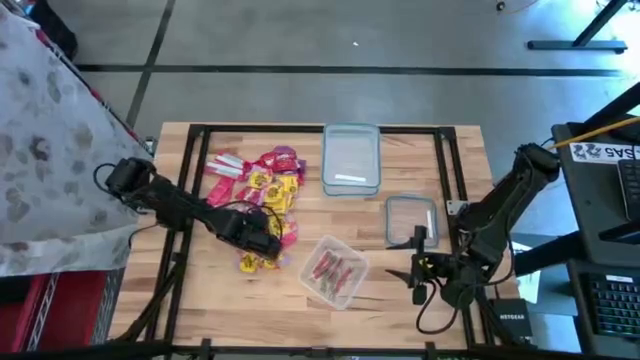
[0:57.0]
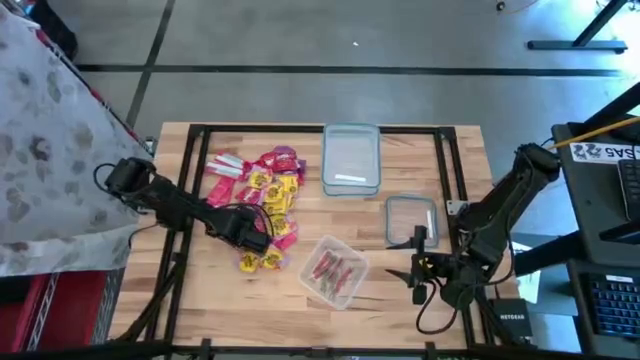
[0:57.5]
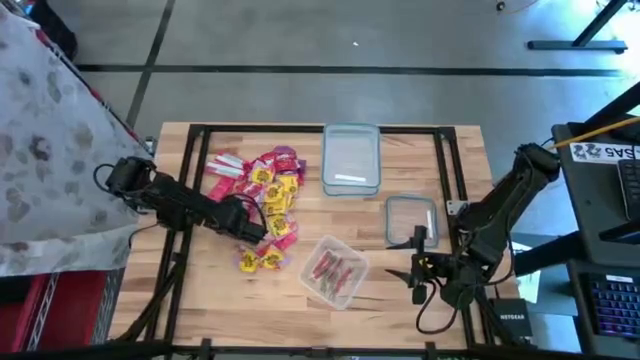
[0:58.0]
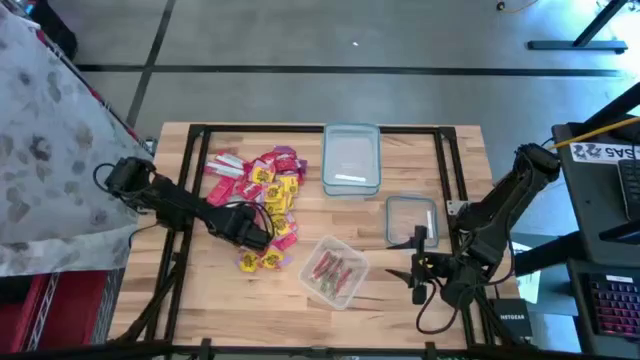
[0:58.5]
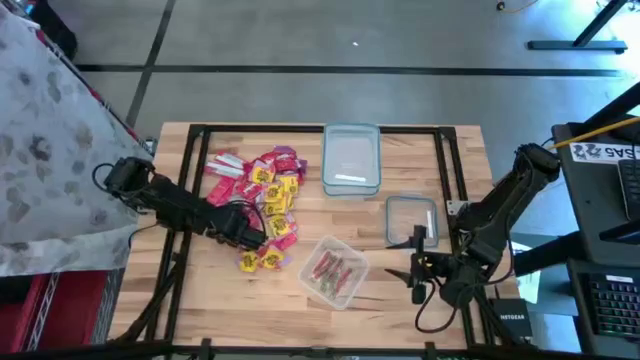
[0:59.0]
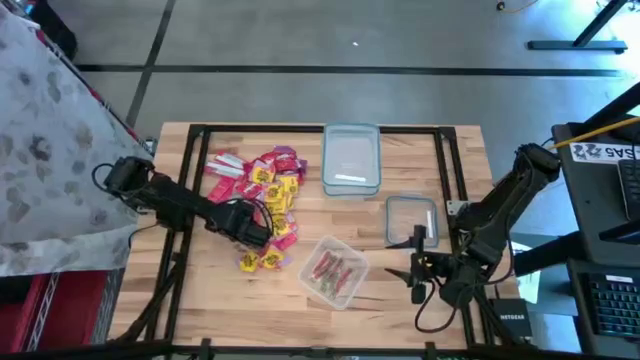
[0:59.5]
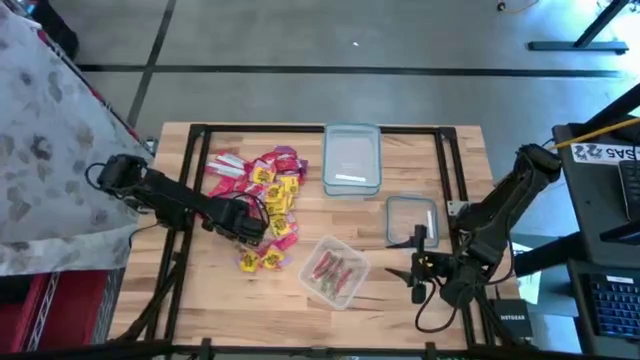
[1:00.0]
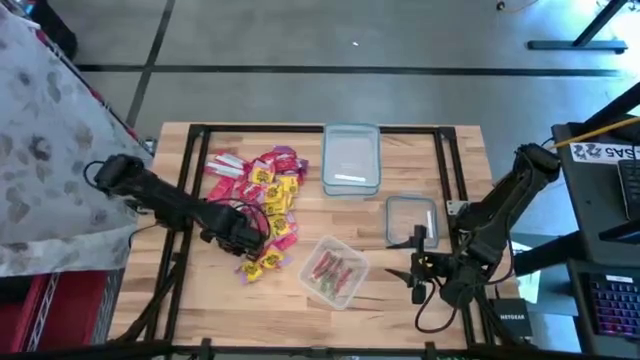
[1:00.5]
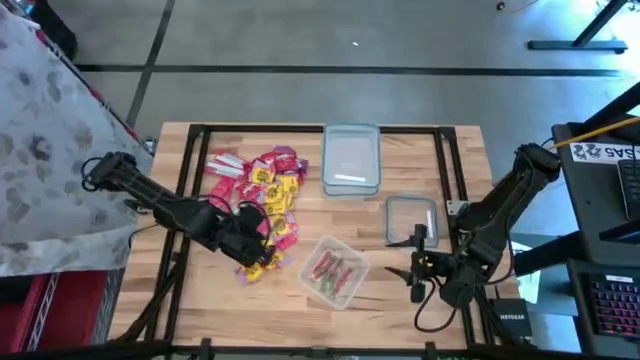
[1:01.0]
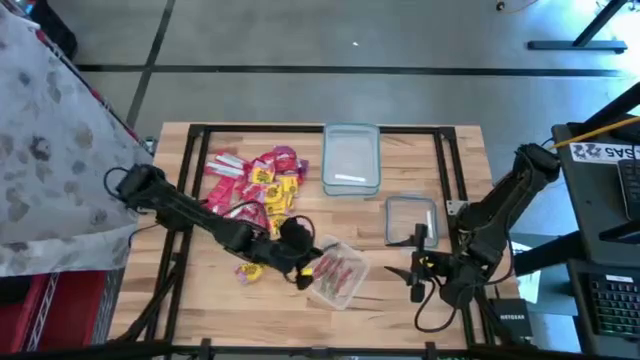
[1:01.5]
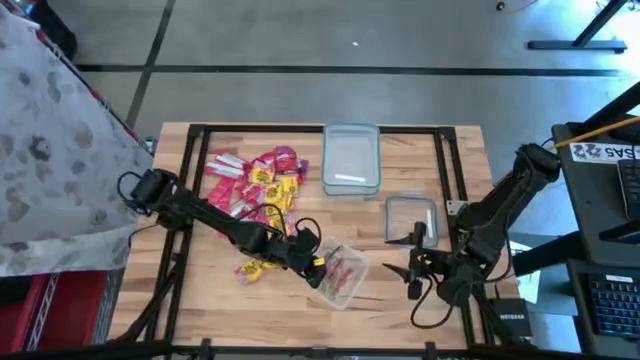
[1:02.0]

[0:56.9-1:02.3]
Task: Sort candy
Put the blue candy into the square transparent food container

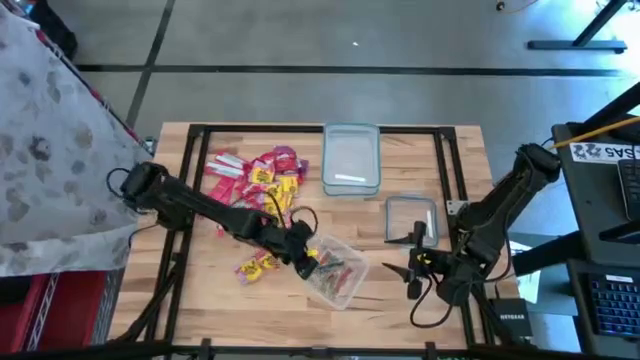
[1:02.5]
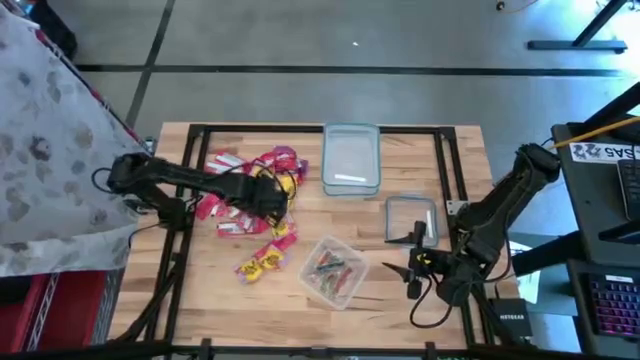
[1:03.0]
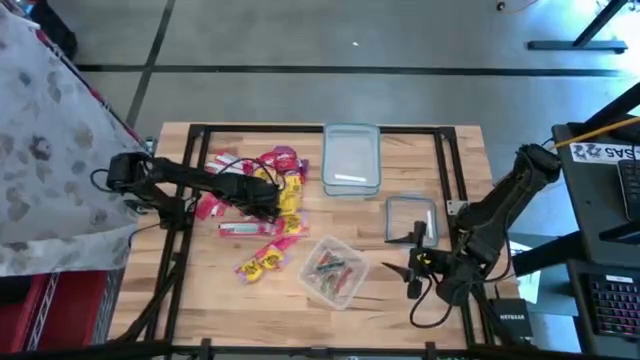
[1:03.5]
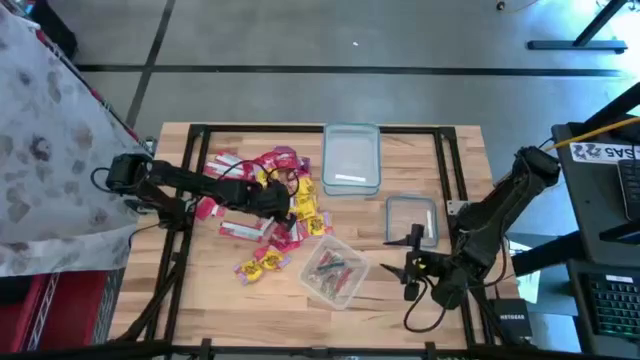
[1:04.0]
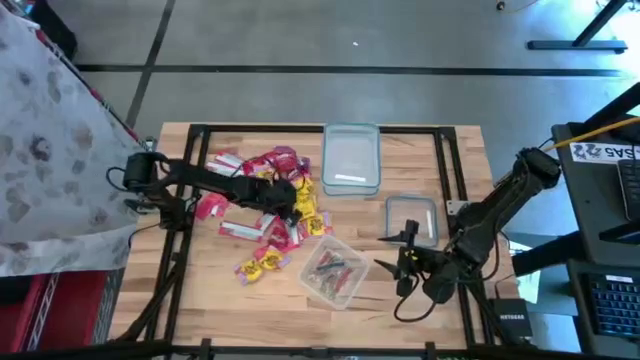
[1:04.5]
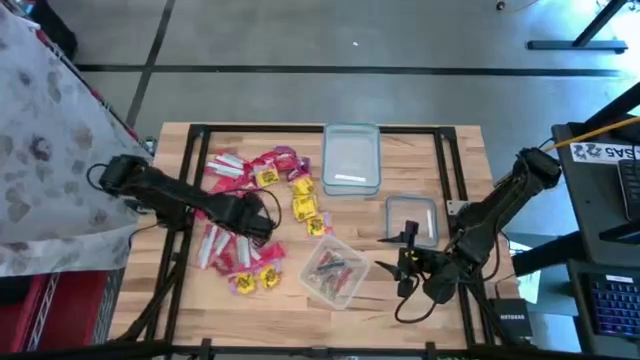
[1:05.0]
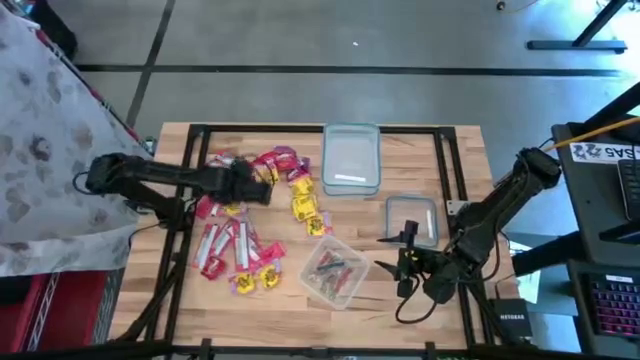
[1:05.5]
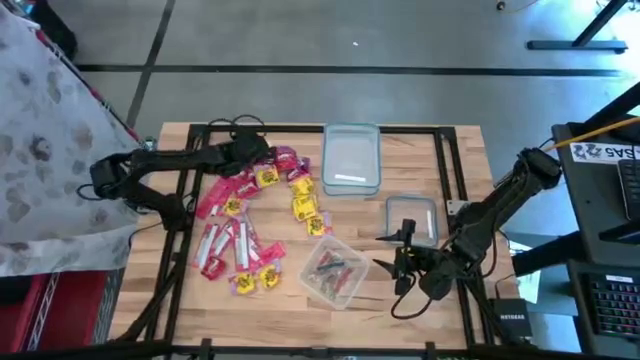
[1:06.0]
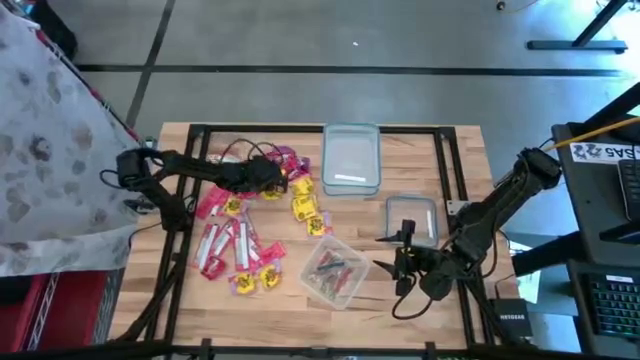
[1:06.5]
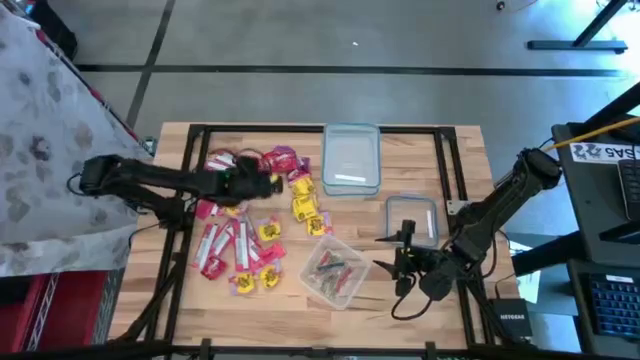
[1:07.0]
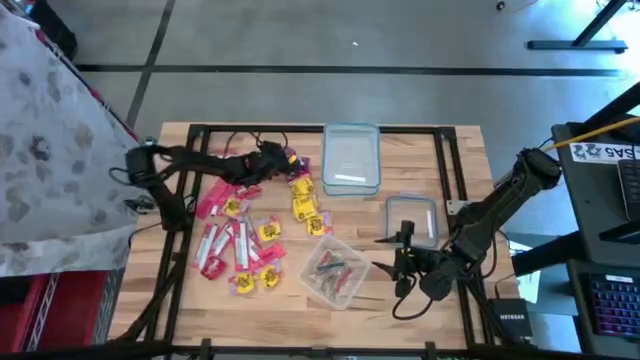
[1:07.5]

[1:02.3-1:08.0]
Adjust the candies in the table

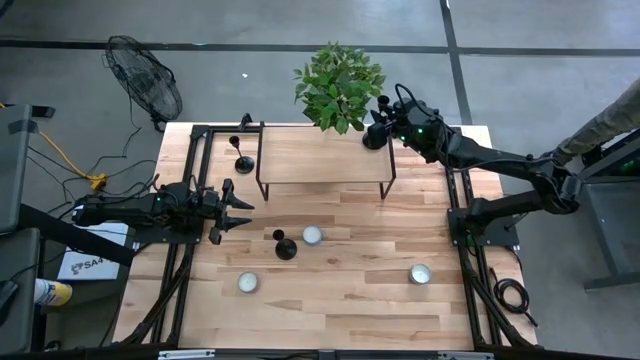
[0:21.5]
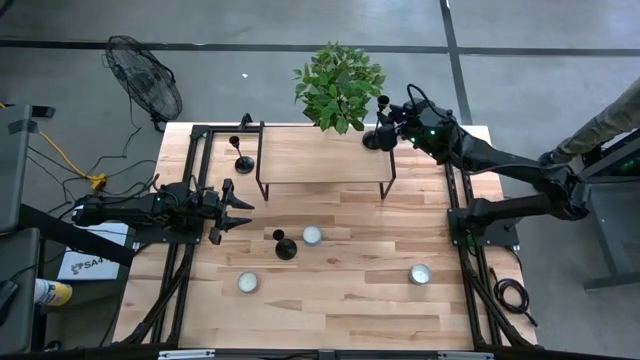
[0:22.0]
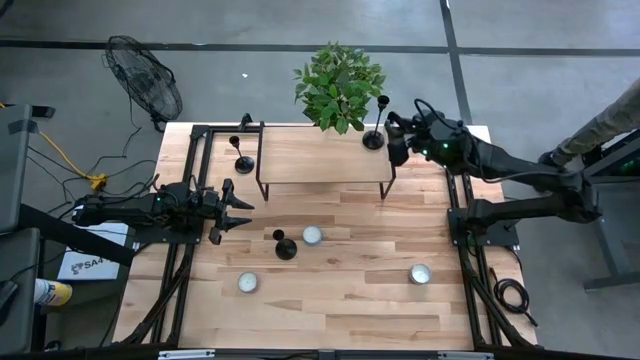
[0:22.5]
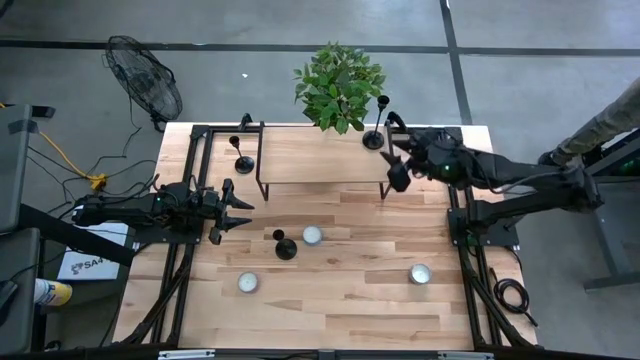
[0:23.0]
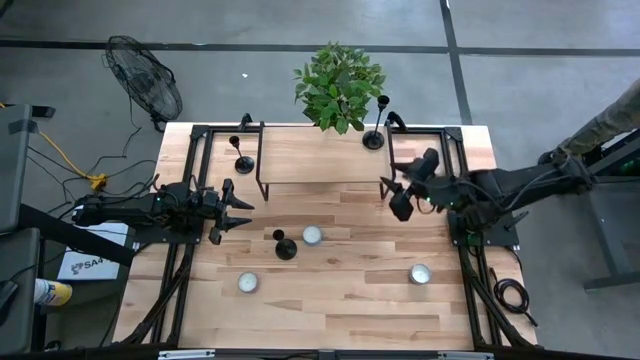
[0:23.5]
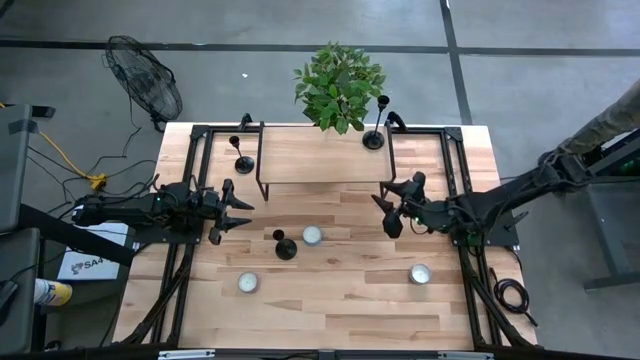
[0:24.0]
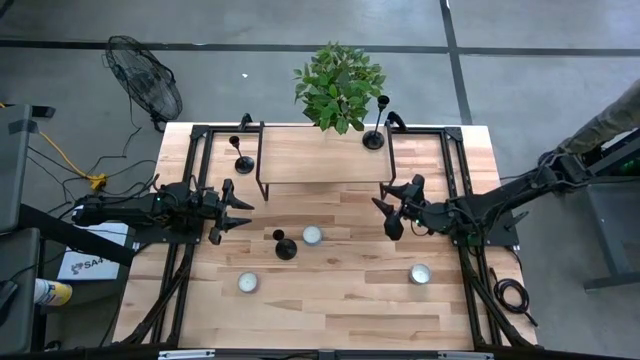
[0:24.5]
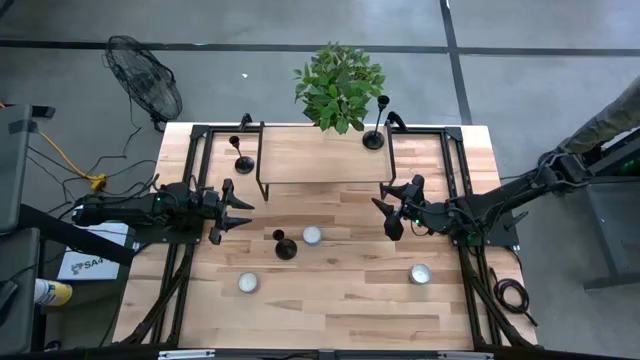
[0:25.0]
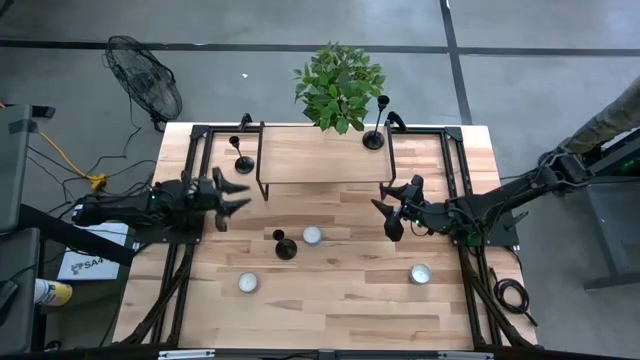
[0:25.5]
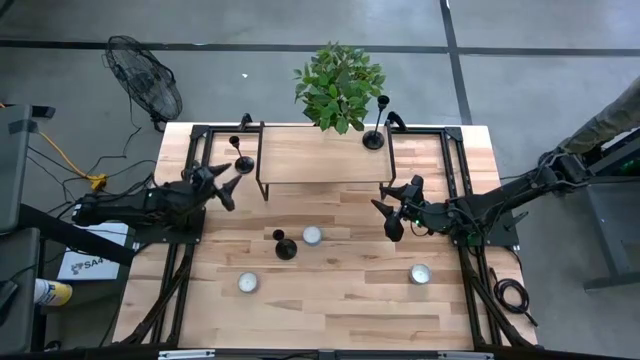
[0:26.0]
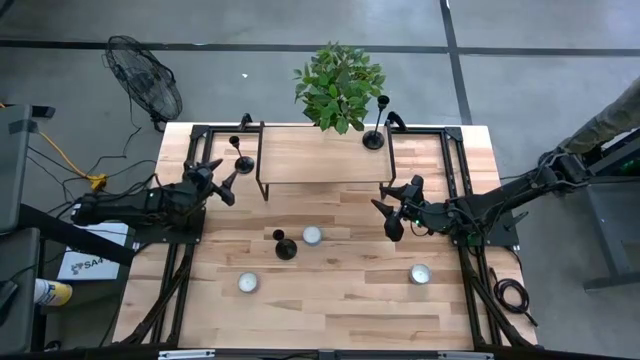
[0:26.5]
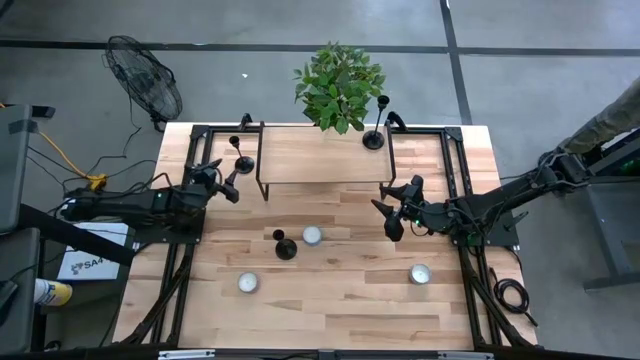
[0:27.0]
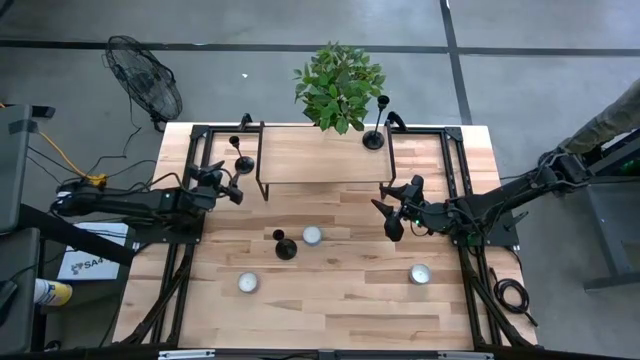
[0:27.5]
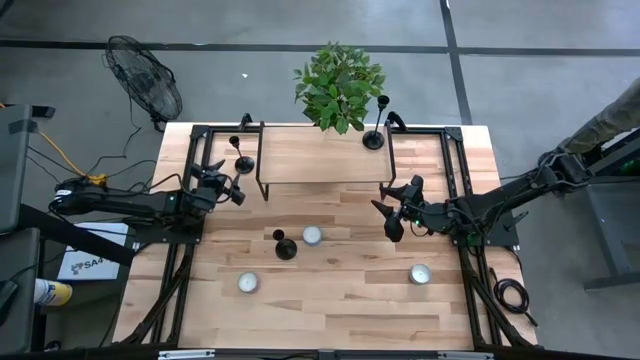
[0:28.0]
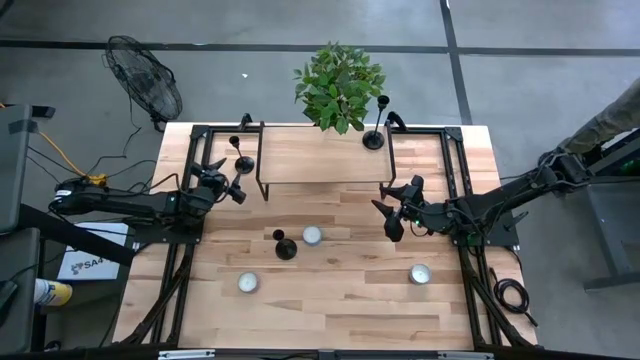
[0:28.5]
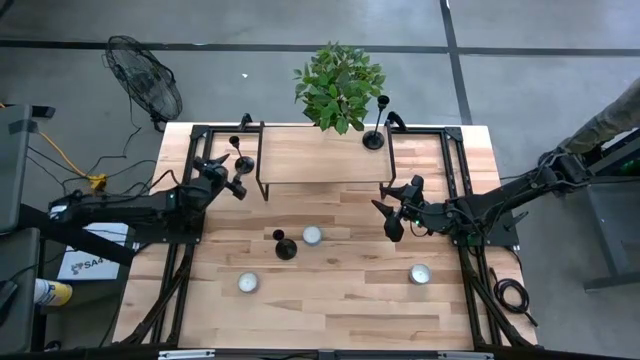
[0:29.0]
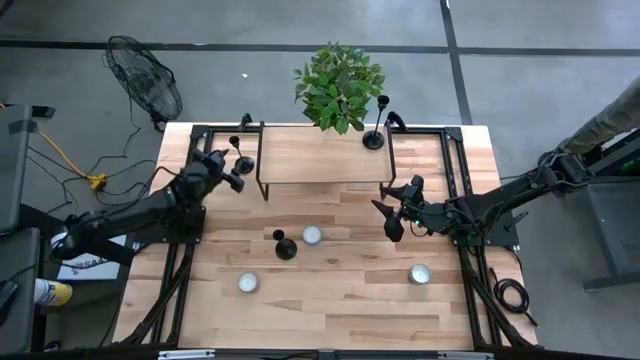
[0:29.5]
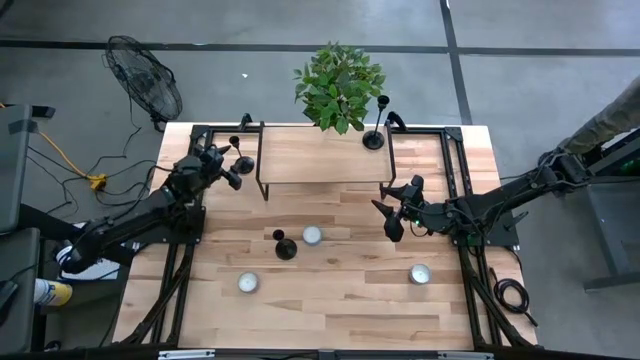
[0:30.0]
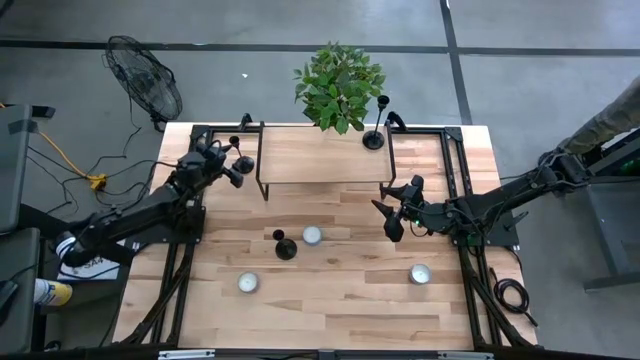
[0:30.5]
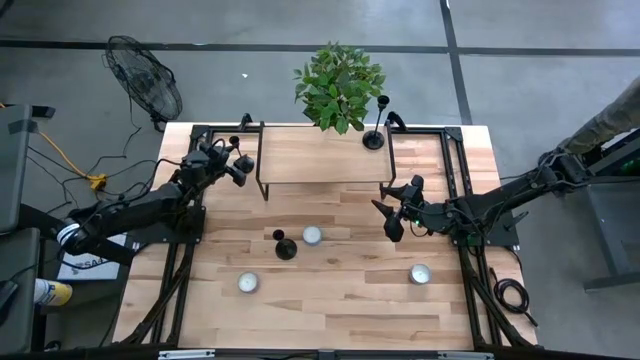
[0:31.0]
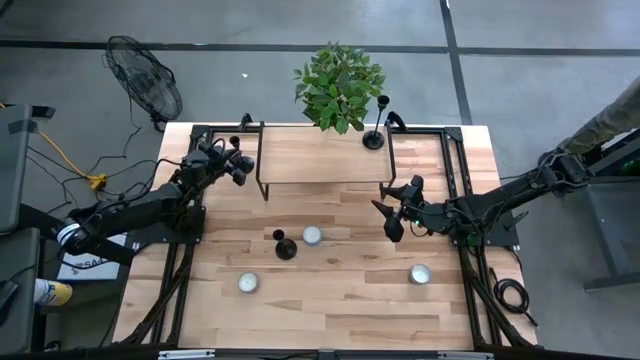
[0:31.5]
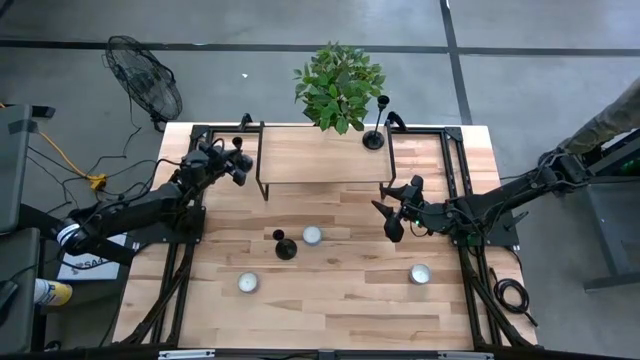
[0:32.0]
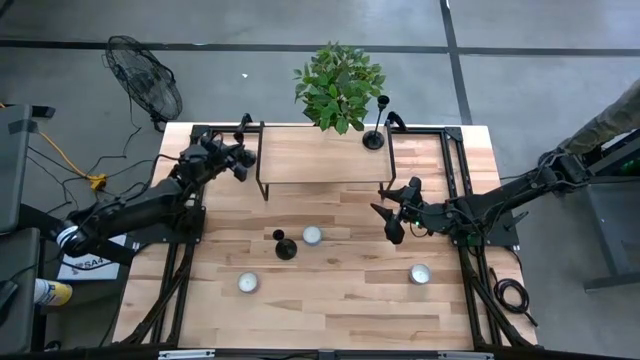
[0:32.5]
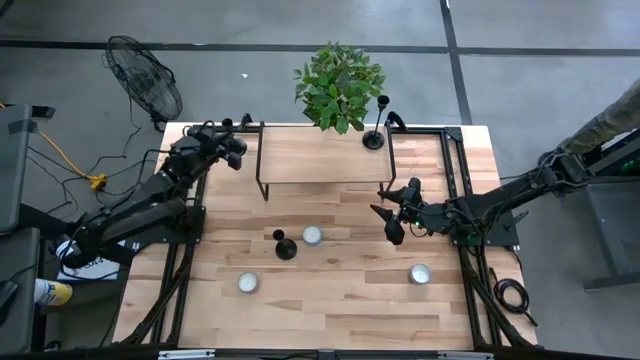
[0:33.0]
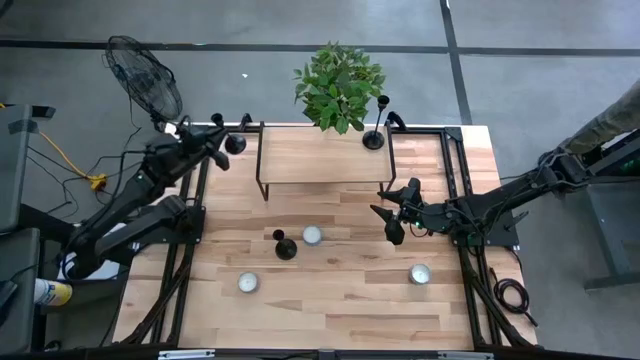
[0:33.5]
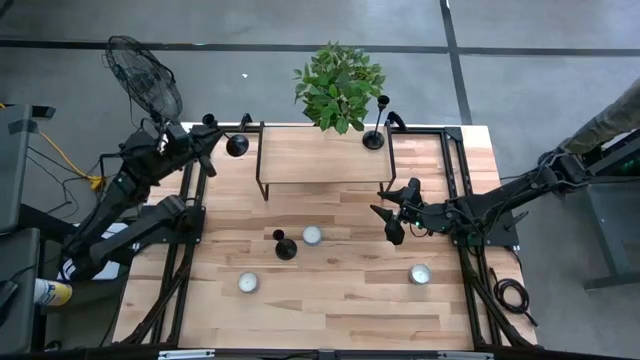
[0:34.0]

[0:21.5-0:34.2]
Task: Pick & Place candle stick holders
Put the left black candle holder on the shelf
